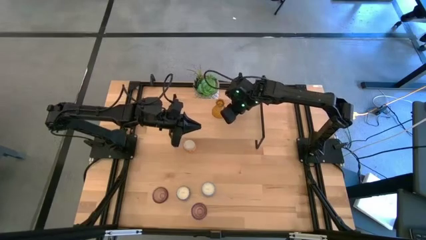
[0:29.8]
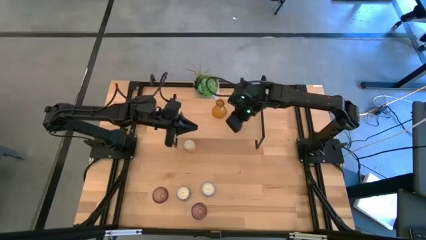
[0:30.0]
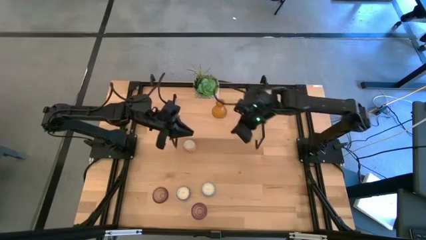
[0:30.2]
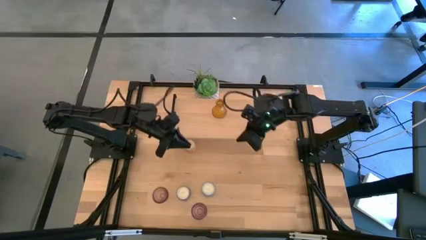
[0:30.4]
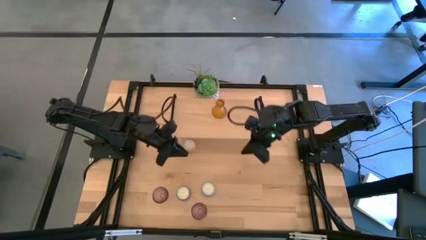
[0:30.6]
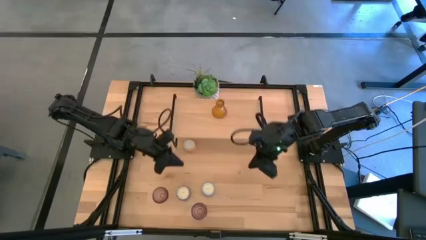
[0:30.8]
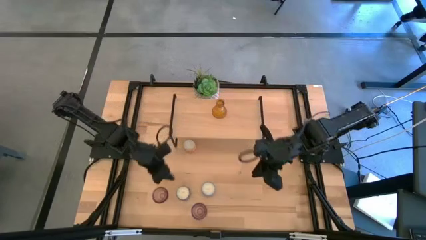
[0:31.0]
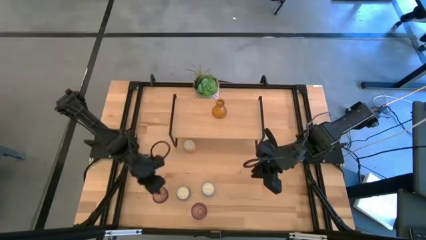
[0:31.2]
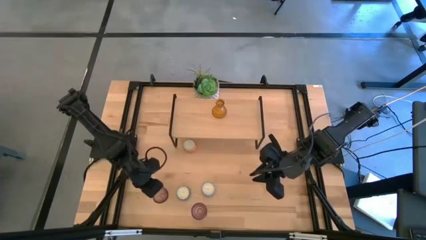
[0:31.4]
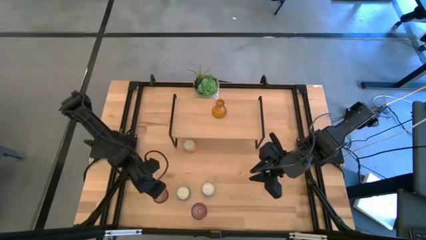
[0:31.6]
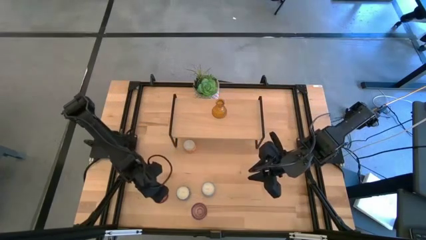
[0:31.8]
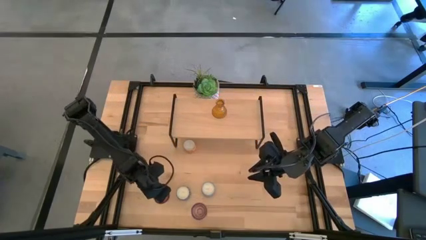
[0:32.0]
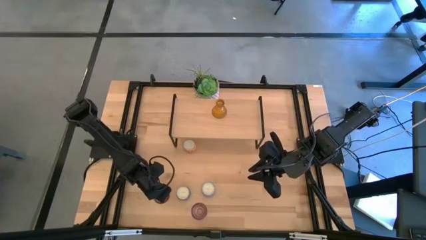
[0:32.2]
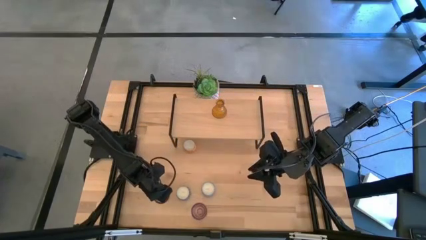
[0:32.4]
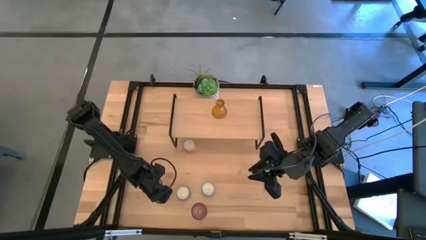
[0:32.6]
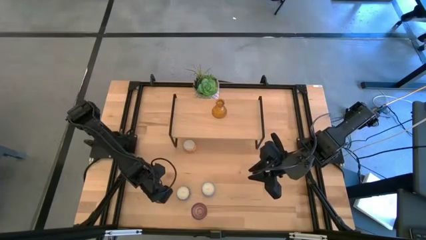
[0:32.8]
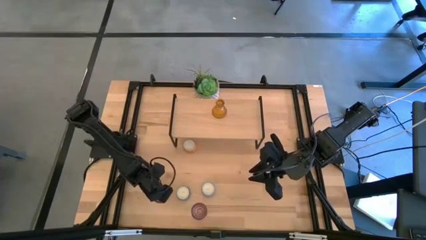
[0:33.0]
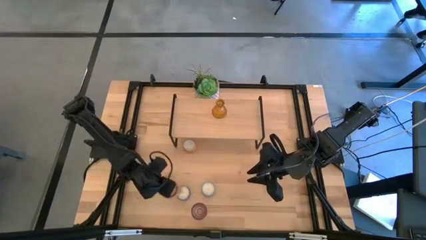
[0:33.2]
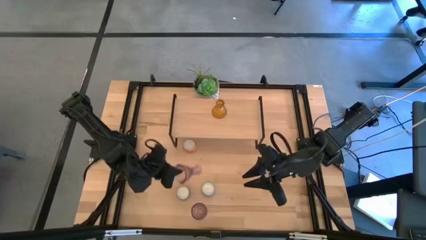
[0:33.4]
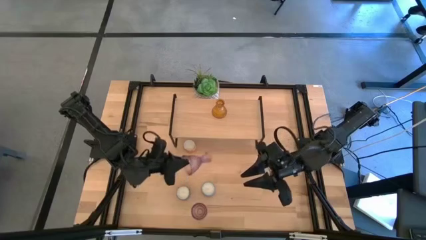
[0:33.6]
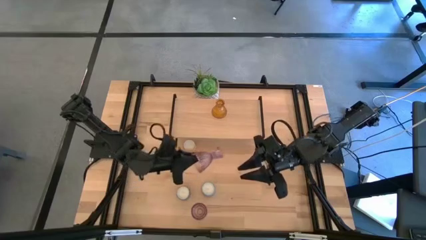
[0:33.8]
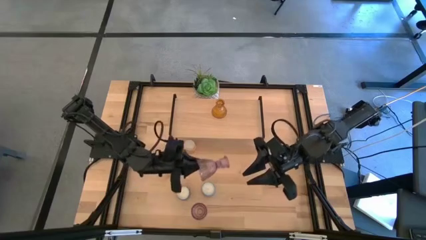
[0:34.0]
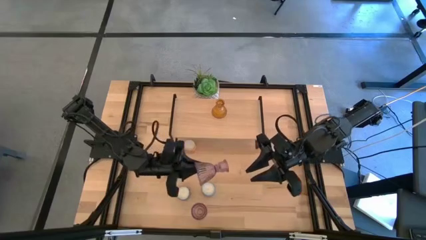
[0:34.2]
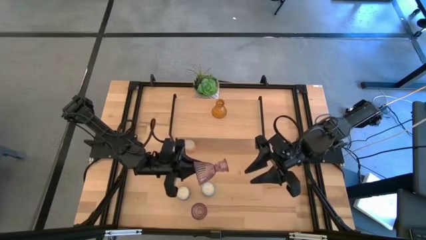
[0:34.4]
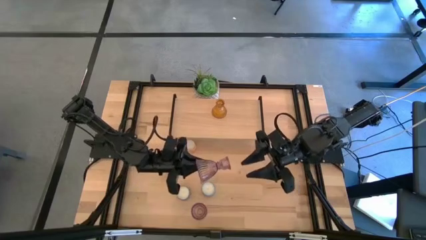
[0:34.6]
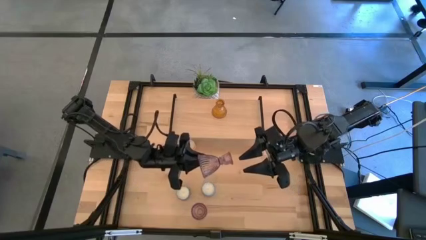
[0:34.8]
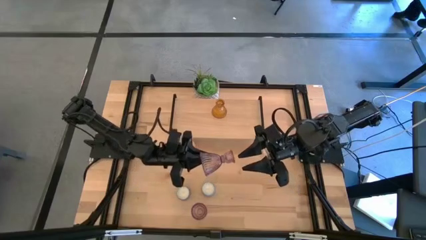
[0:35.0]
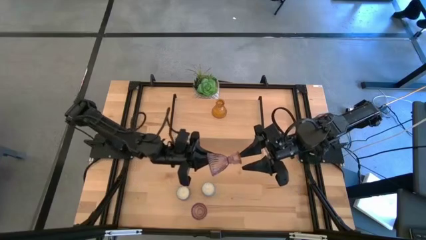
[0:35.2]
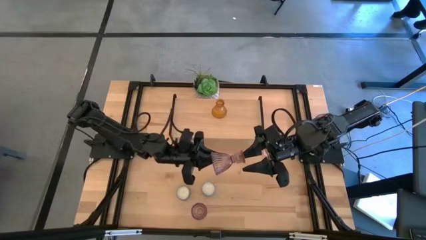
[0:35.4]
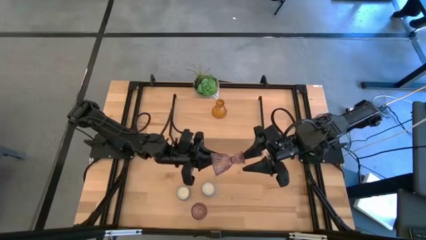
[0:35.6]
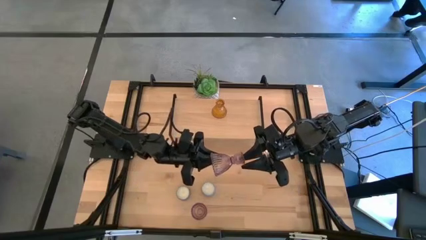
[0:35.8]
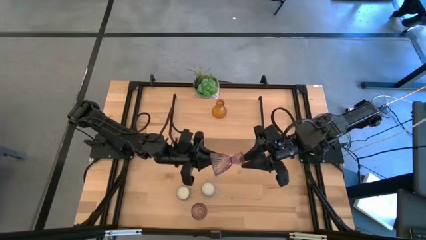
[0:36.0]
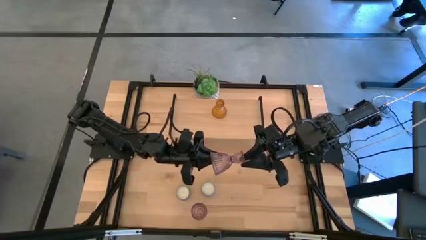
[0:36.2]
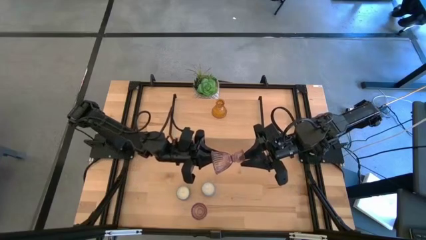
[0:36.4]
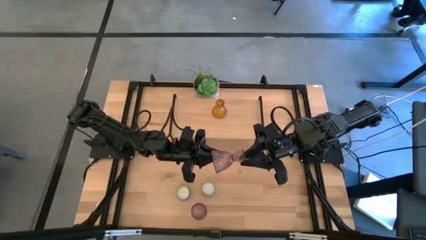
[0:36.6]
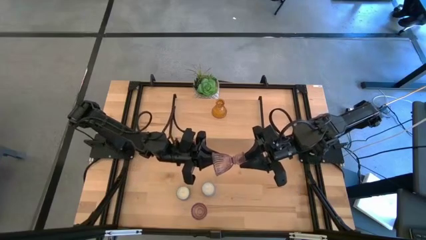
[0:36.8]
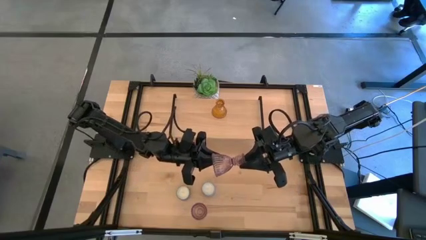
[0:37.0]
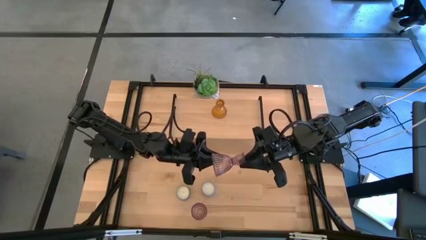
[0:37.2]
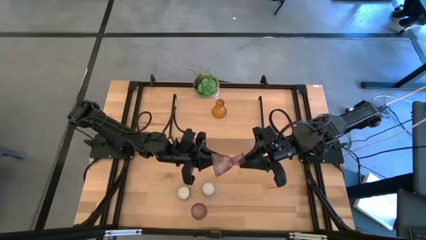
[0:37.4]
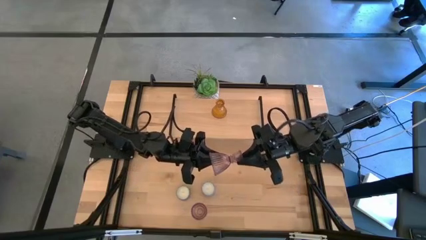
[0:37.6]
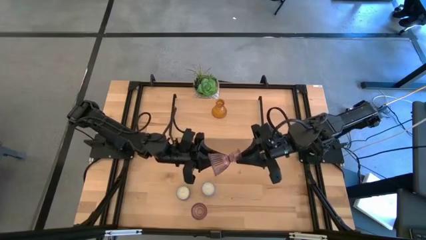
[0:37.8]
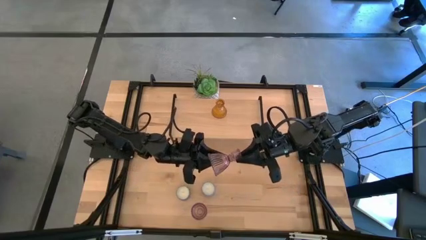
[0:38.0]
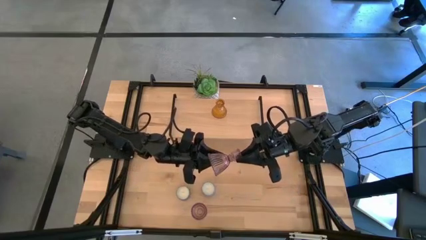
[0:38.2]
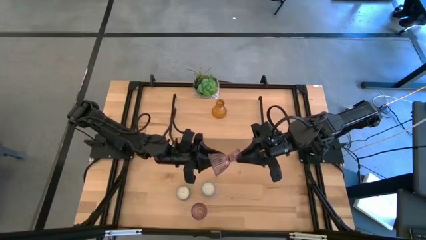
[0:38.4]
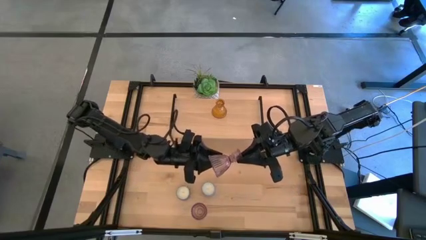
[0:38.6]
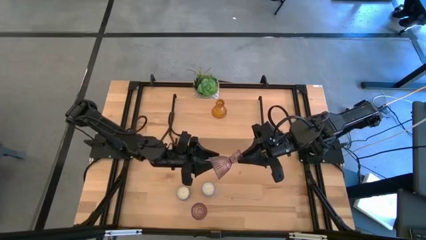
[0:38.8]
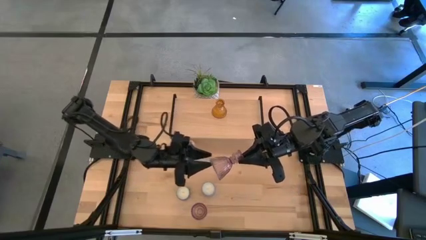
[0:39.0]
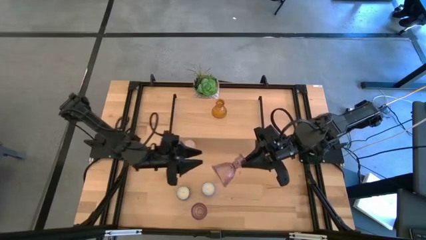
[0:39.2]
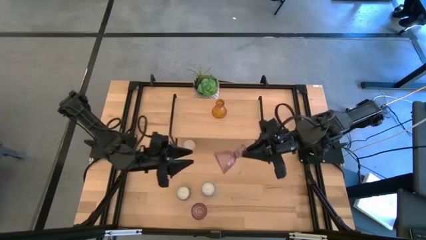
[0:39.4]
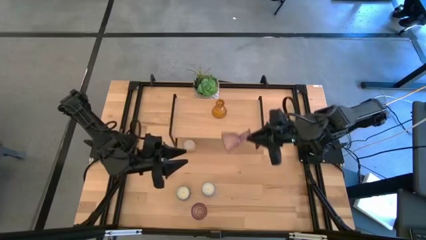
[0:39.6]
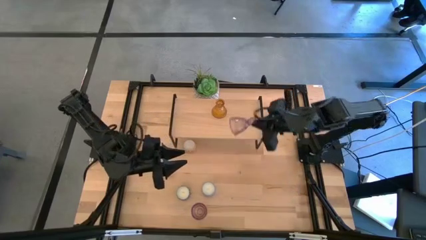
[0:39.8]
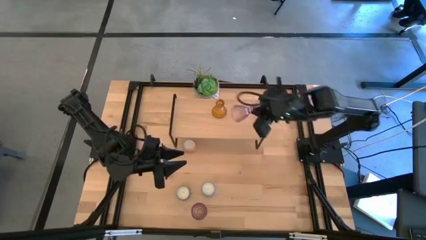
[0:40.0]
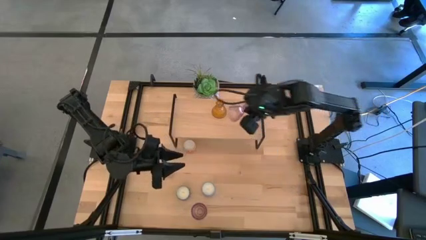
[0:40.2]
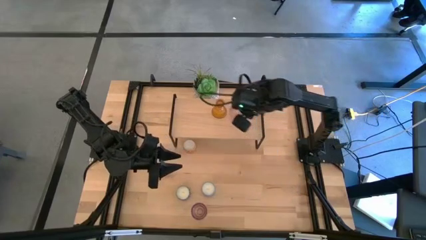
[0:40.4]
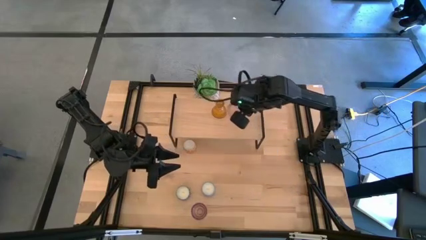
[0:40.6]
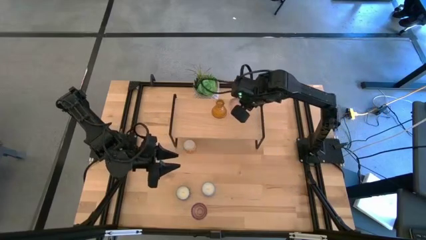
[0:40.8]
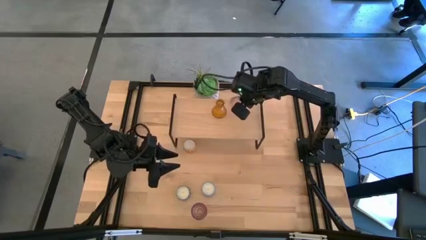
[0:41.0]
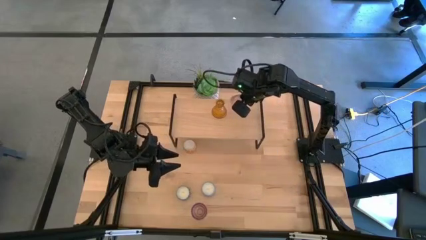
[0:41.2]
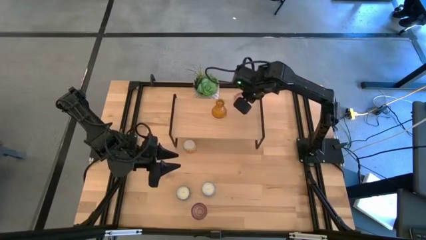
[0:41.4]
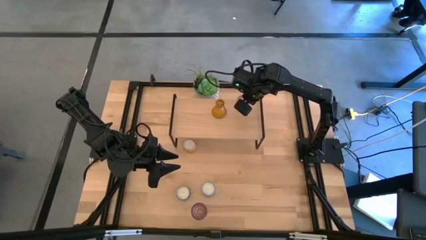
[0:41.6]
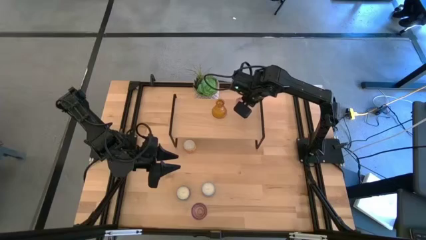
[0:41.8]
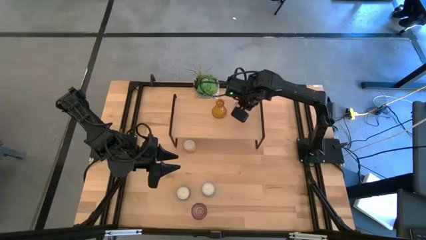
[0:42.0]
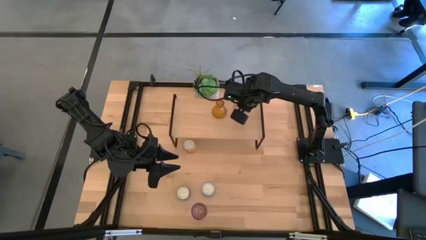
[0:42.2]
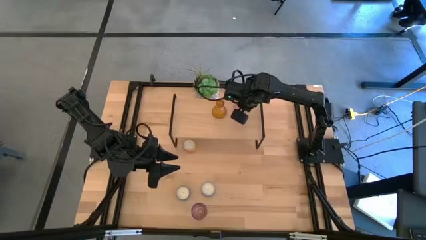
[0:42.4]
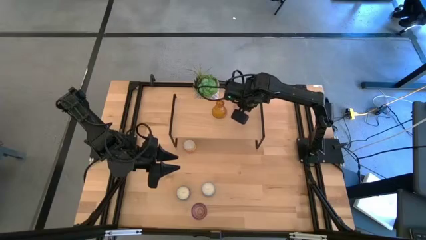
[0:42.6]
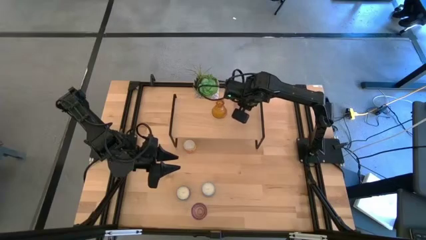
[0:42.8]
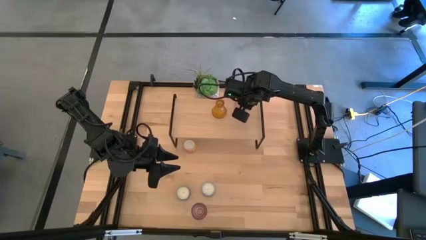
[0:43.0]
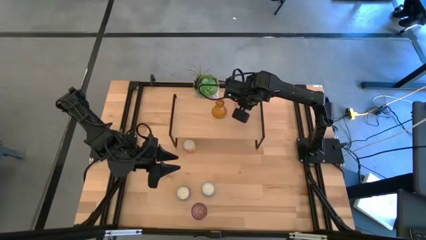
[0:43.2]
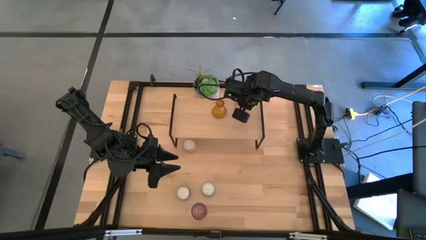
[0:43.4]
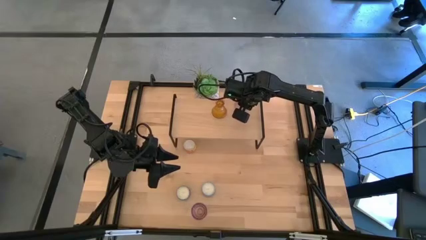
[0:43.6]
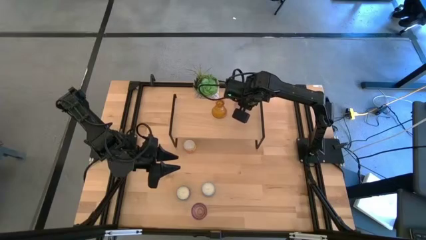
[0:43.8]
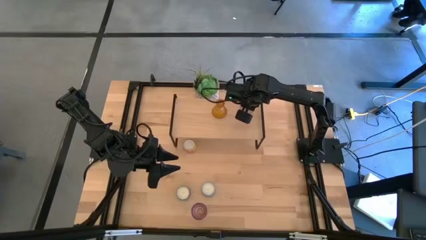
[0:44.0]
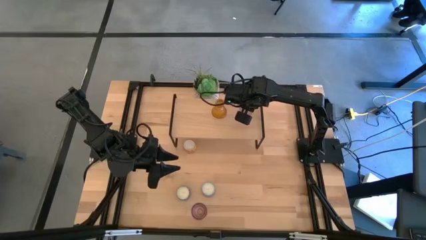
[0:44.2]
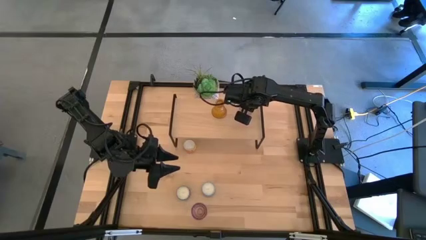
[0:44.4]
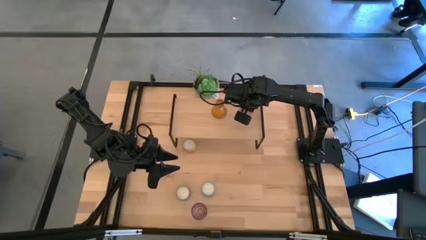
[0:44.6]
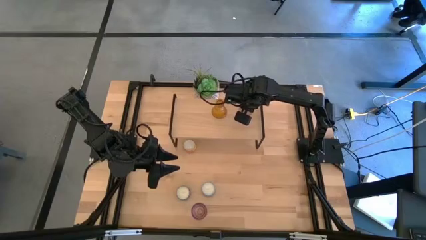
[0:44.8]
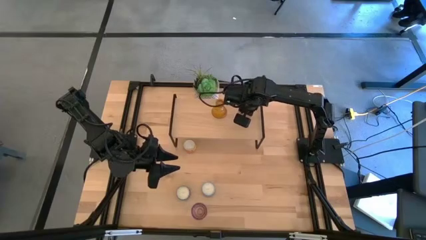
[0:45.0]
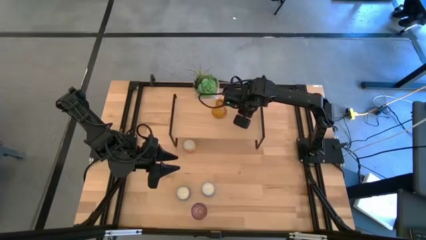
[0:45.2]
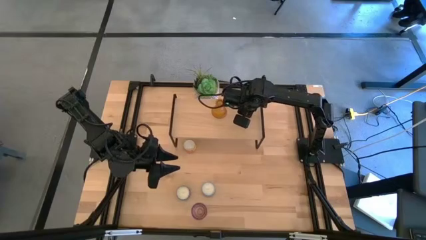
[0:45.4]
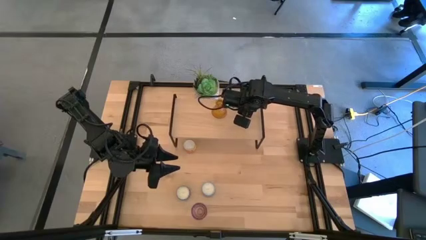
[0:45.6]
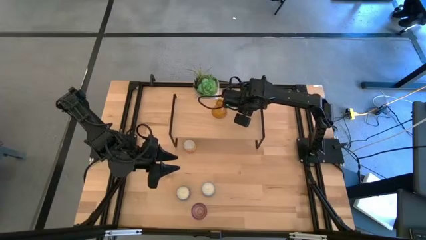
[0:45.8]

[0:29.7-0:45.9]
Task: Pick & Place candle stick holders
Put the left violet candle holder on the shelf
